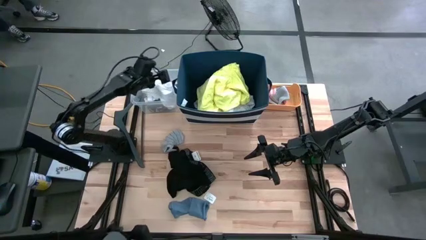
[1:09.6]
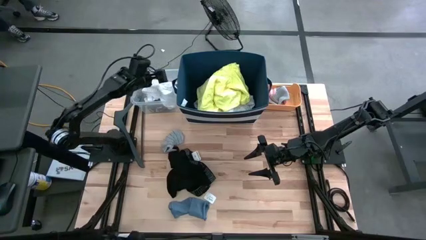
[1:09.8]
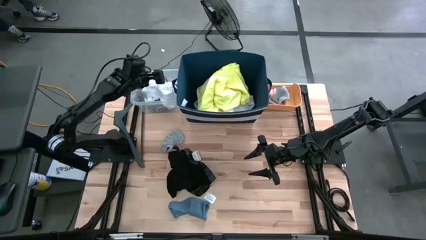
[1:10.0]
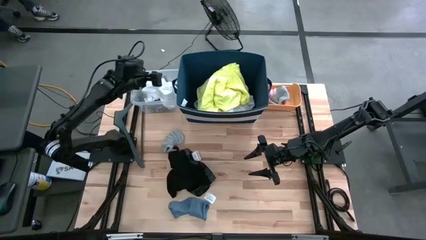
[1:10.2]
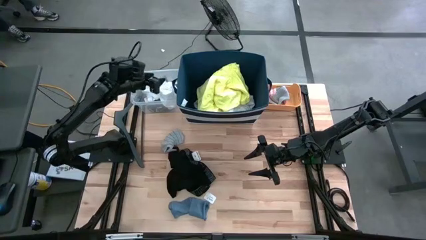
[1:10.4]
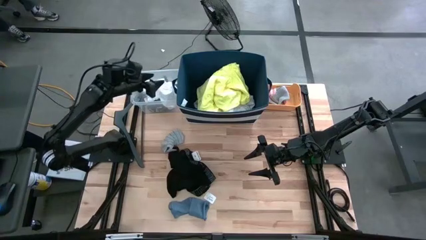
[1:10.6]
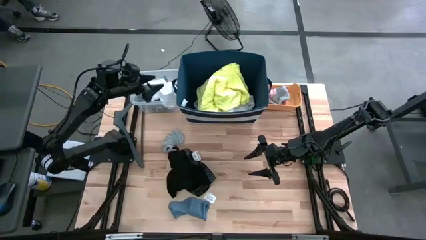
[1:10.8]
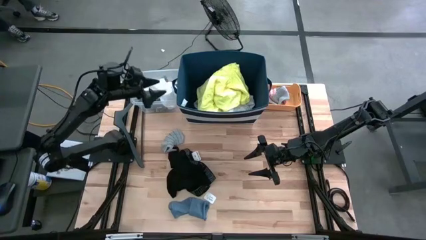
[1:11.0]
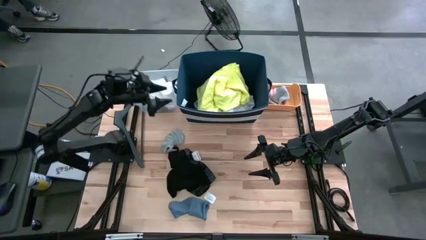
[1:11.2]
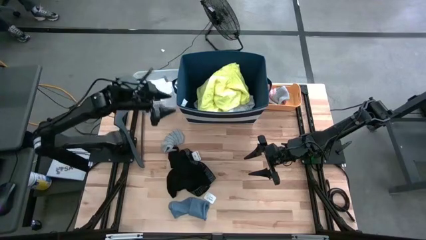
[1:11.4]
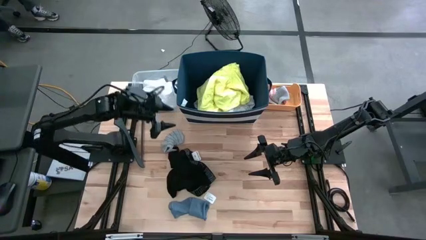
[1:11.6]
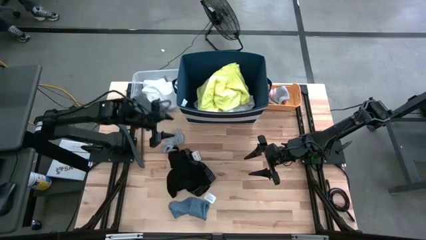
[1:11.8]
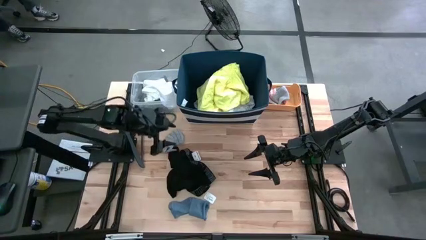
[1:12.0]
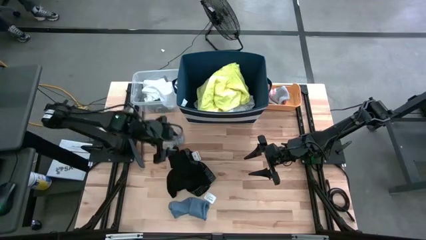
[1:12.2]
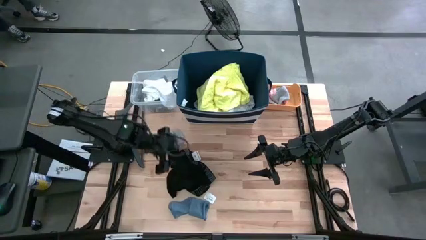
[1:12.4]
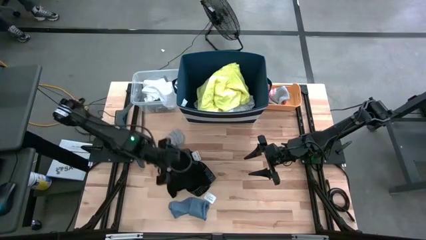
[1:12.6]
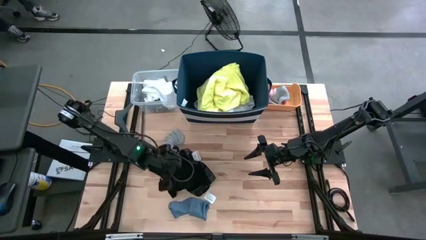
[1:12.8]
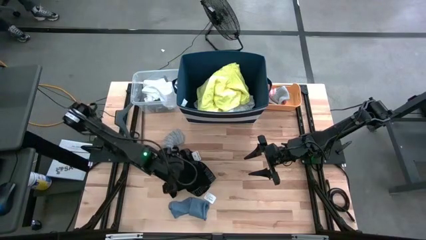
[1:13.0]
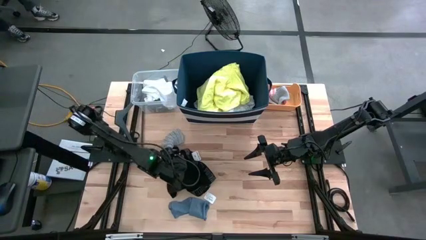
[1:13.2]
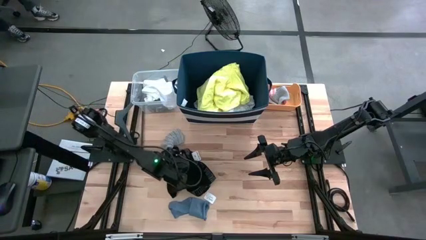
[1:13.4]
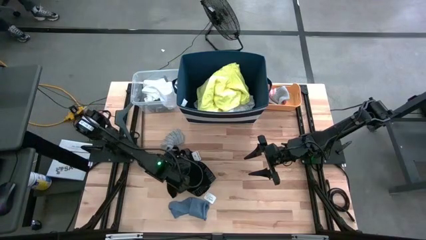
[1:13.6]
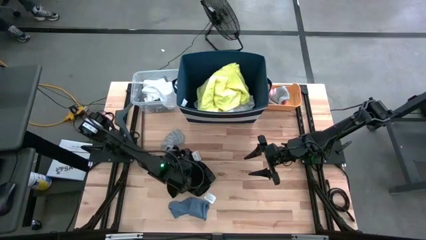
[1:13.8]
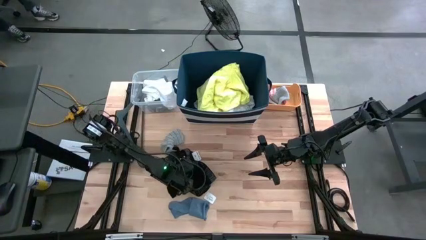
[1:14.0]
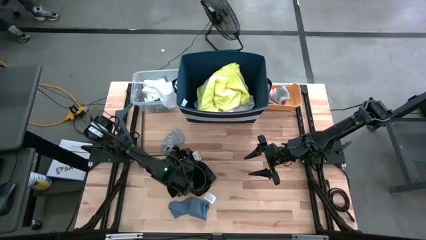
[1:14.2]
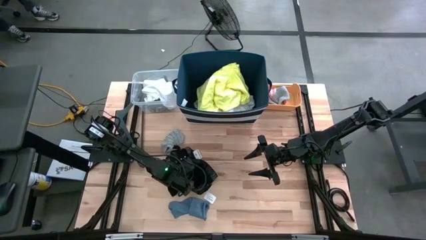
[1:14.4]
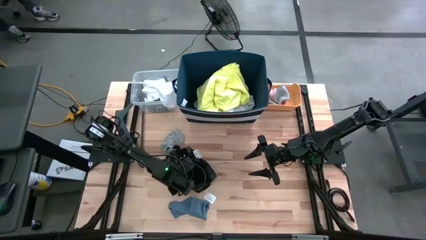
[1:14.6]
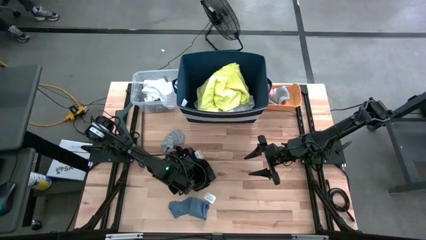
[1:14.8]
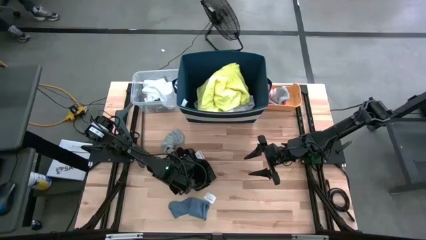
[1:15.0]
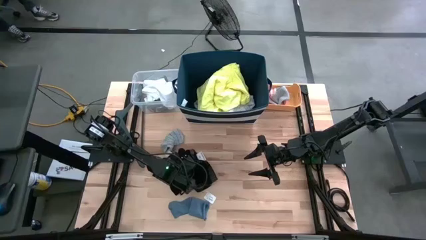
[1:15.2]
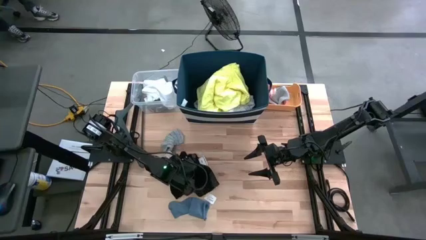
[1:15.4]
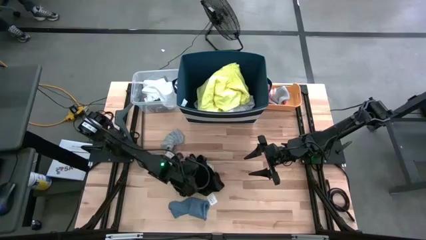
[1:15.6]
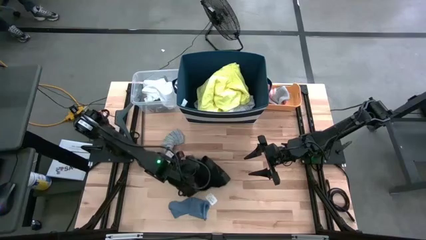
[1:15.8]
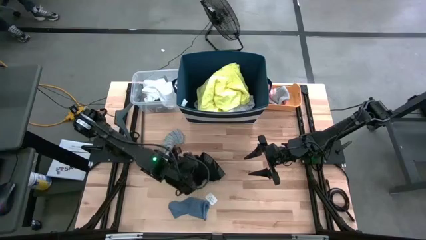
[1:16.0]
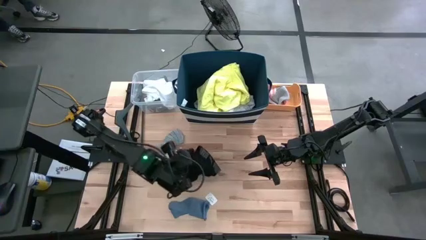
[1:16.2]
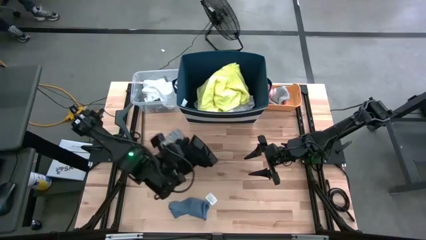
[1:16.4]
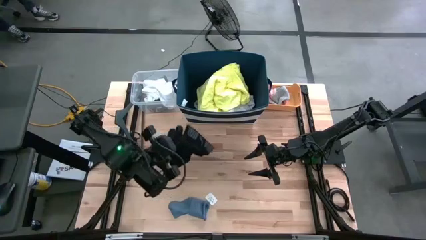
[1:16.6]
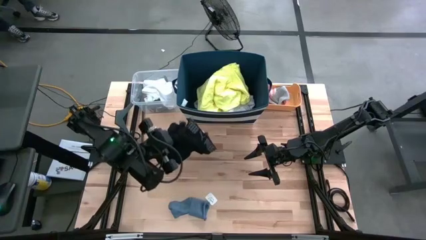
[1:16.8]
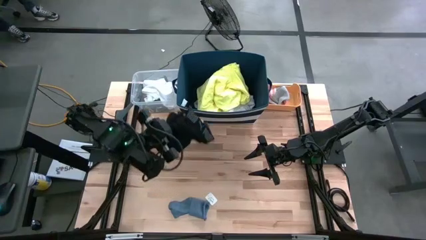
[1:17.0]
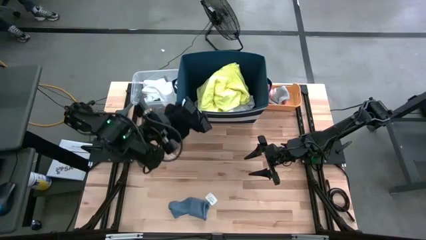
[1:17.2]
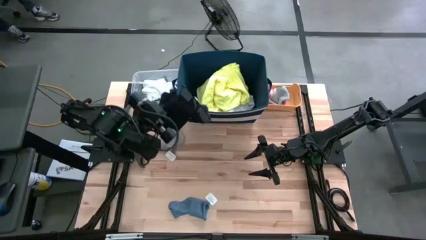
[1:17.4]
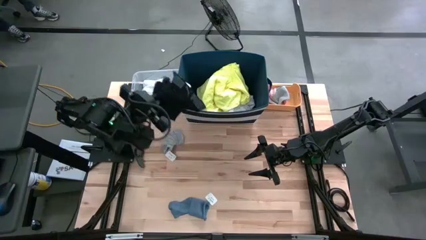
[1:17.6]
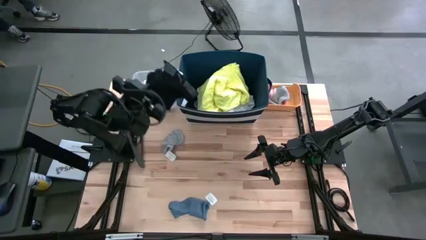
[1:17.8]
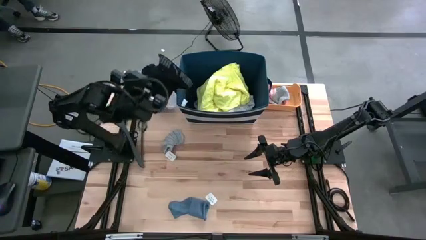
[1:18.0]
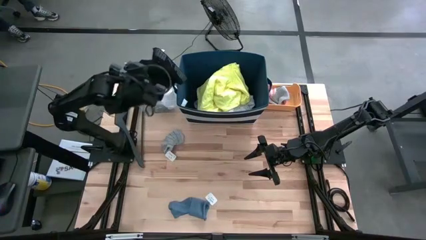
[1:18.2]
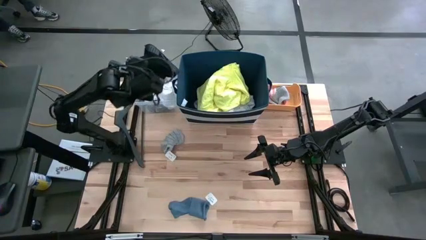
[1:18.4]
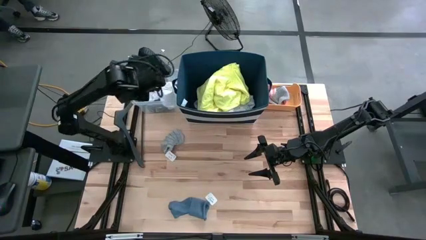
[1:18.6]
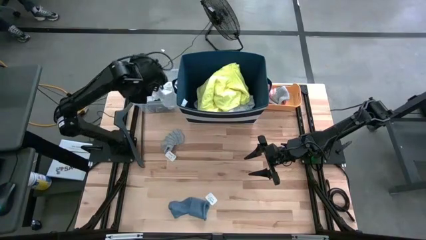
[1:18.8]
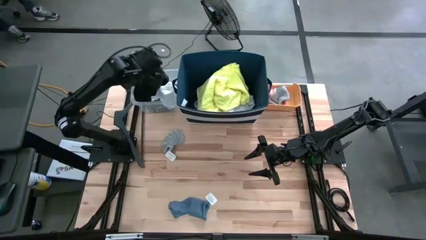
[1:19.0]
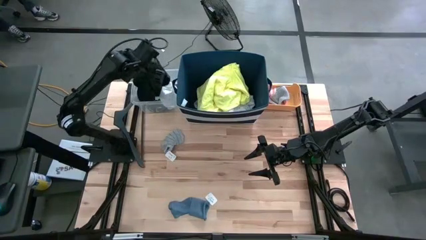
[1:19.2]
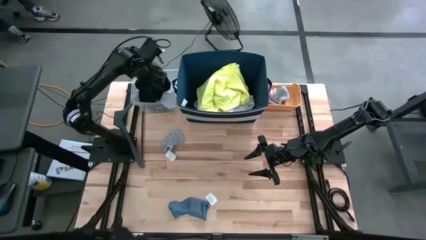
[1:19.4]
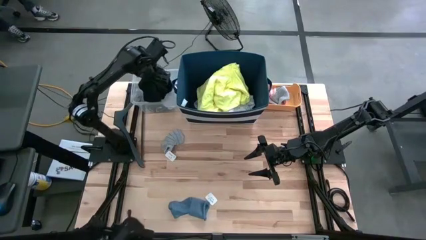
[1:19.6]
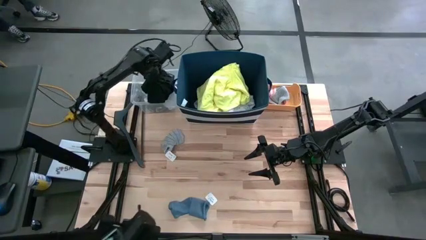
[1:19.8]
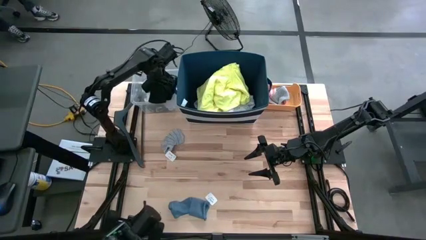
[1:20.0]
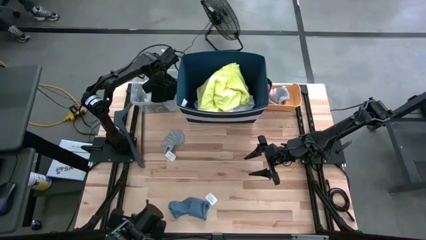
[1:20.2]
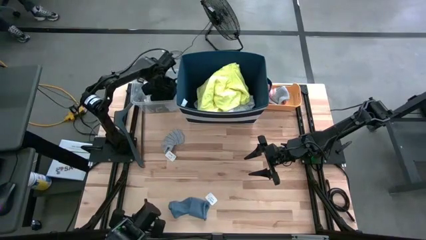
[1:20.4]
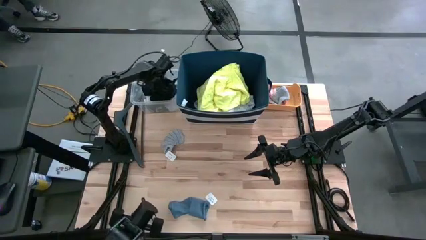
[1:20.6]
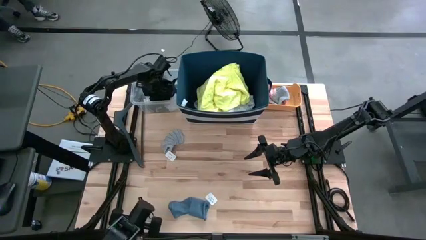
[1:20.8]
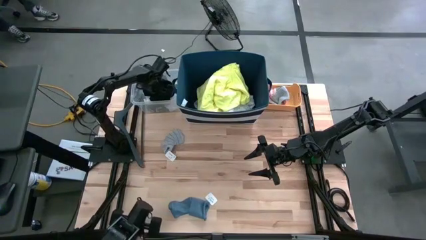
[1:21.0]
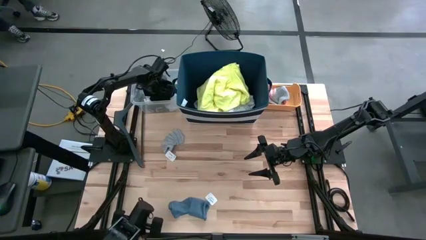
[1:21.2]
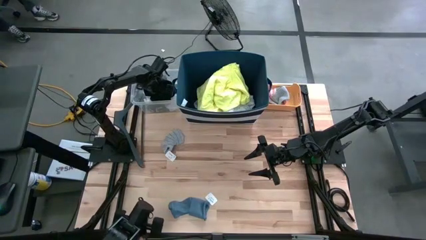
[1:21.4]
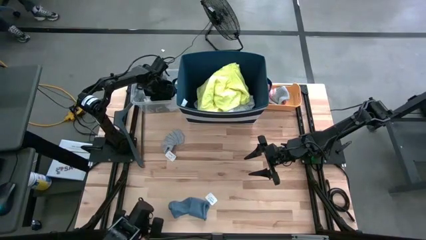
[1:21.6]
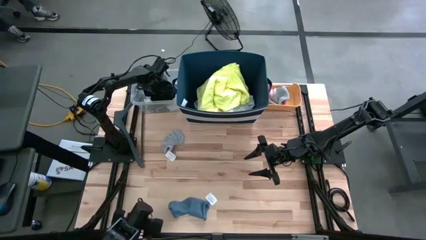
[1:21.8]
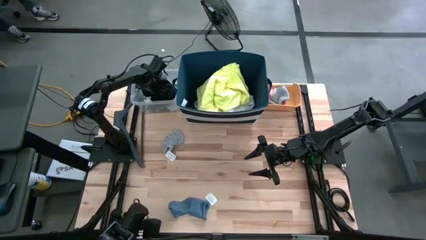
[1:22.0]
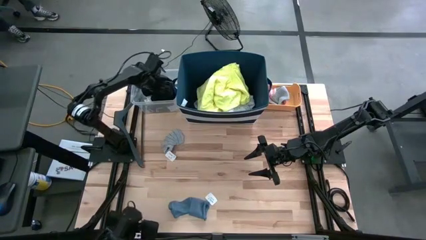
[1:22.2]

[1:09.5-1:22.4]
Task: Pick & Place Cloths
Put the black boxer shorts into the transparent container

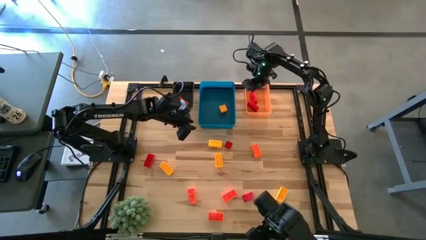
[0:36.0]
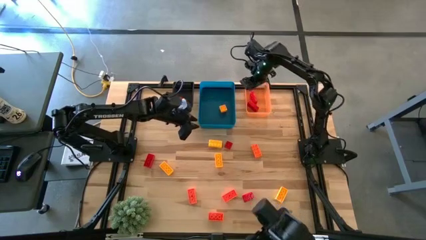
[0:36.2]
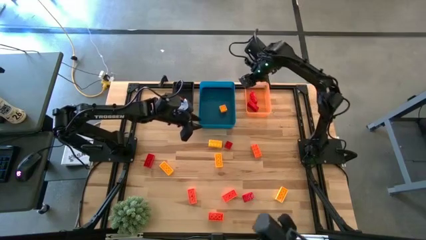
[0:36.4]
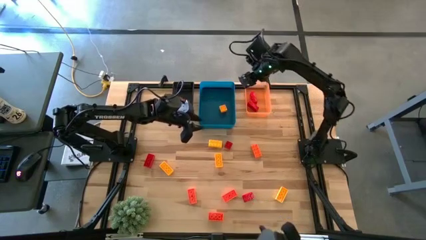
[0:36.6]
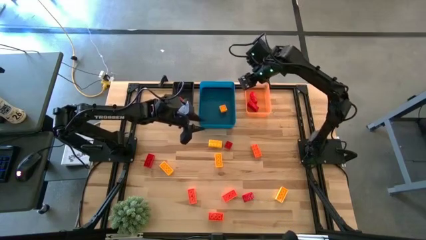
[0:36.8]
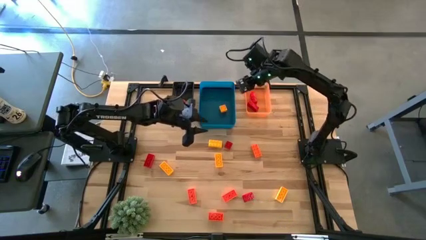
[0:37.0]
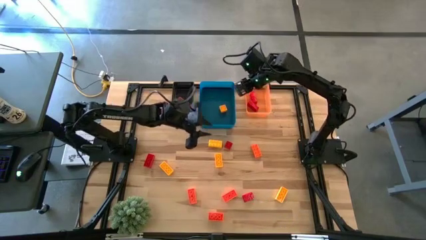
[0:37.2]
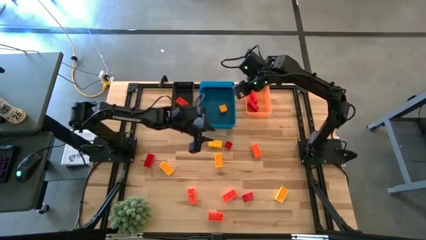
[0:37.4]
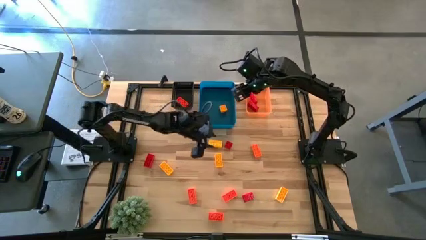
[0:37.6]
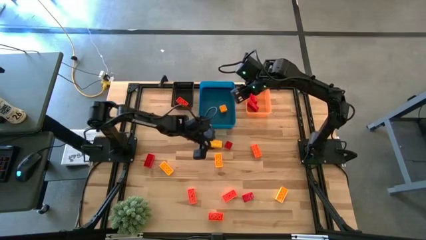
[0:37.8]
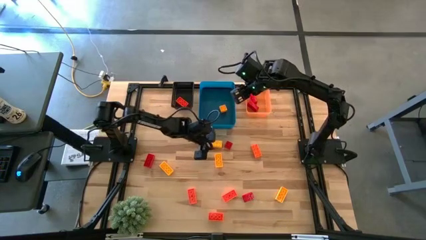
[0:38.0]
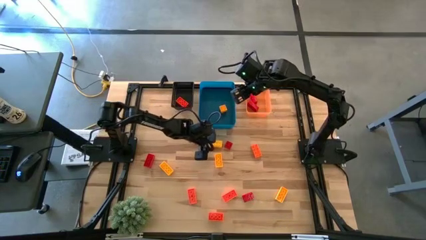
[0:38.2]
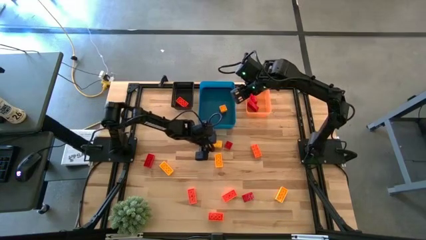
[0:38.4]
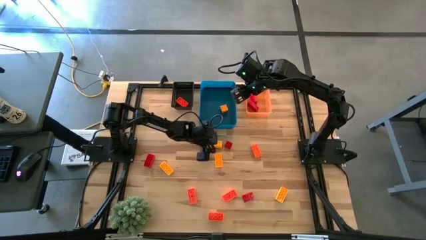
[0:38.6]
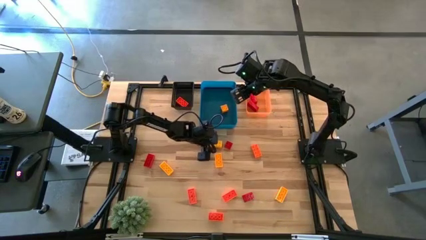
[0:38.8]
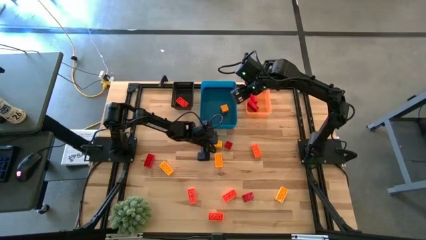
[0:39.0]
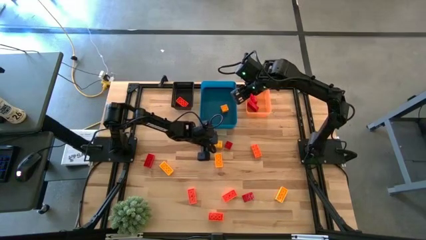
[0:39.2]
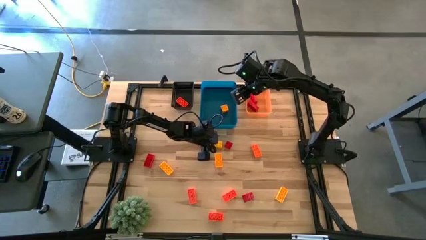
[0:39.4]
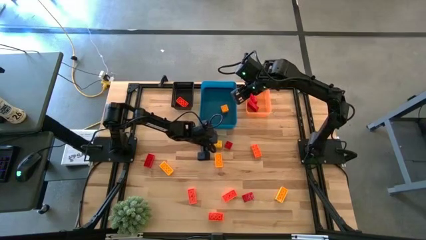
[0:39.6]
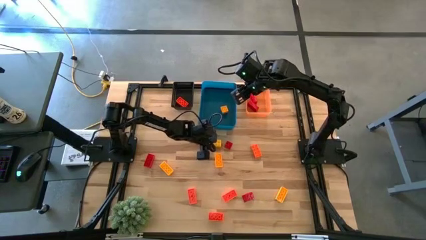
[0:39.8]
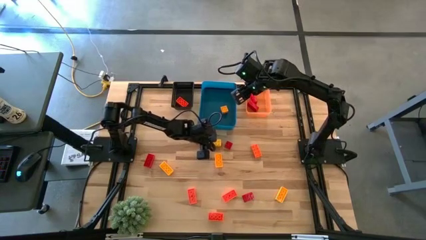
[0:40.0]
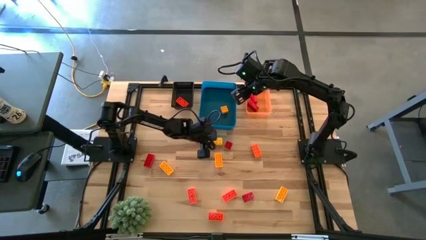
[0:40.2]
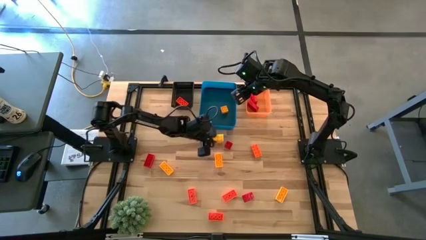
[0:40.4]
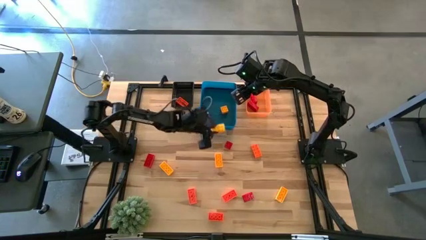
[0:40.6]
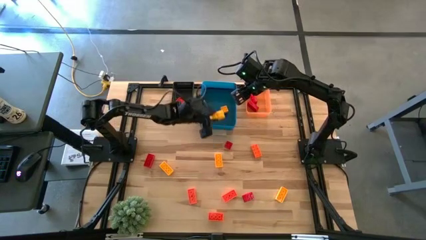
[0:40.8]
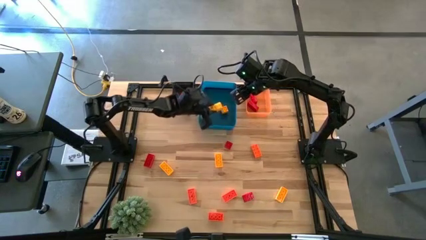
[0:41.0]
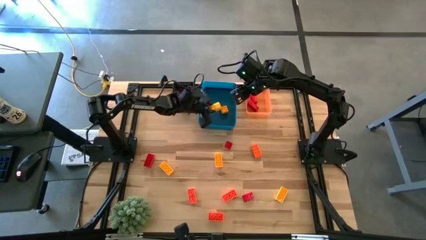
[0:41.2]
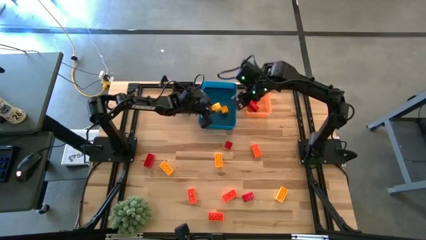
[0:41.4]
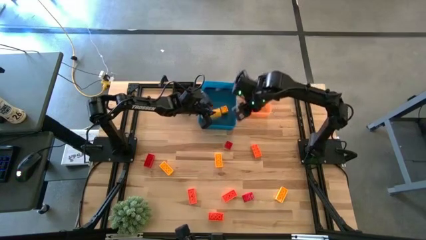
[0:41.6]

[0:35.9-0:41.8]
Task: Sort & place blocks by color
Put the yellow game piece into the blue bin
